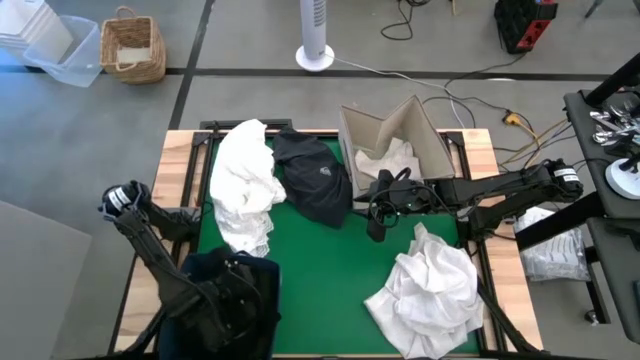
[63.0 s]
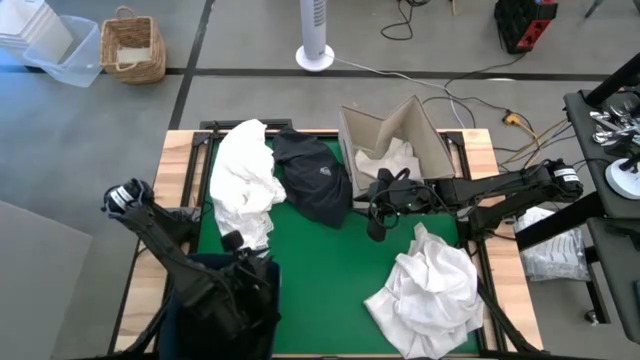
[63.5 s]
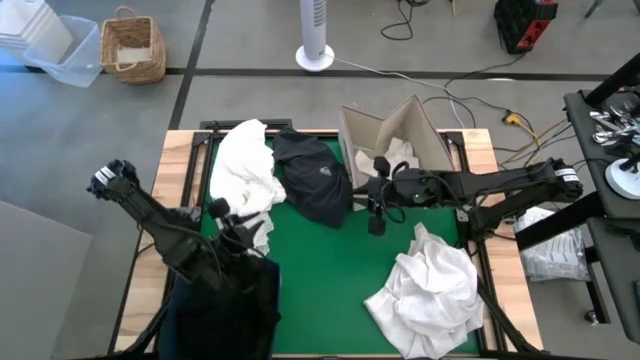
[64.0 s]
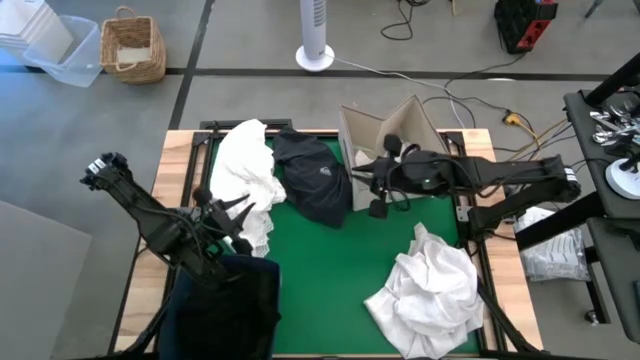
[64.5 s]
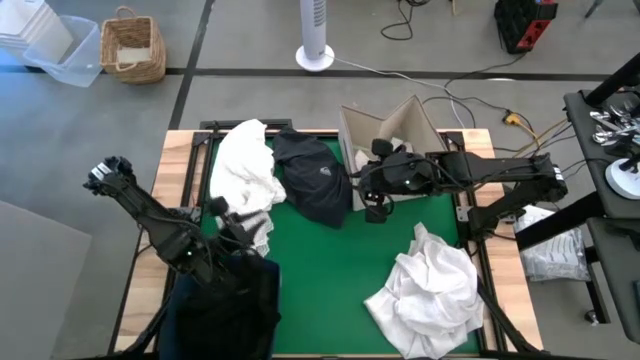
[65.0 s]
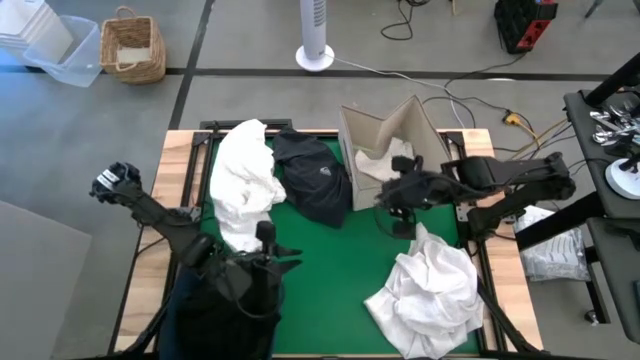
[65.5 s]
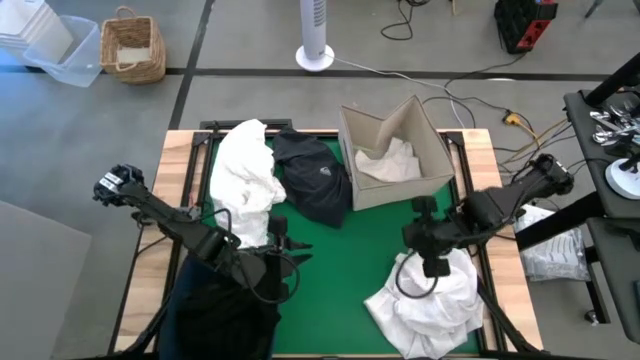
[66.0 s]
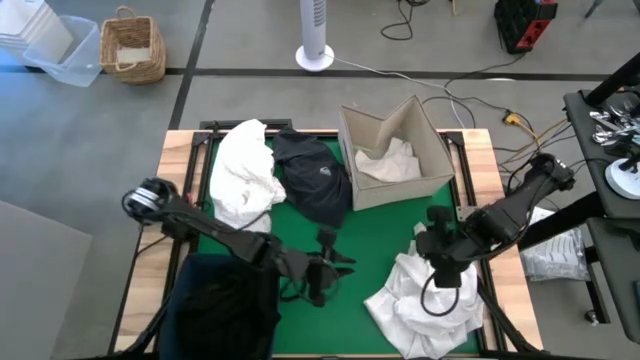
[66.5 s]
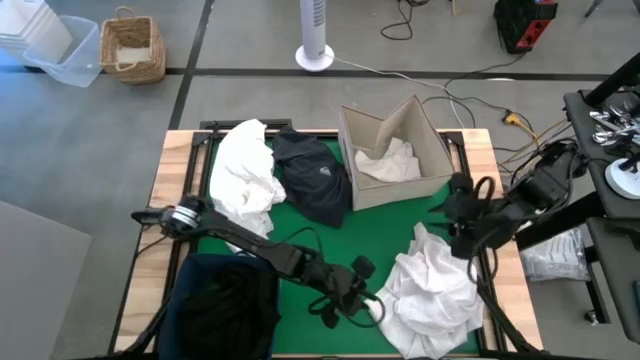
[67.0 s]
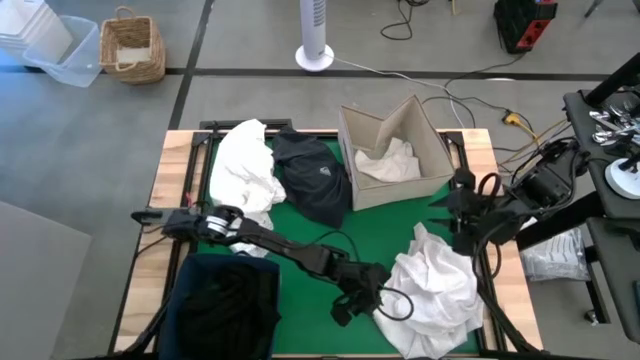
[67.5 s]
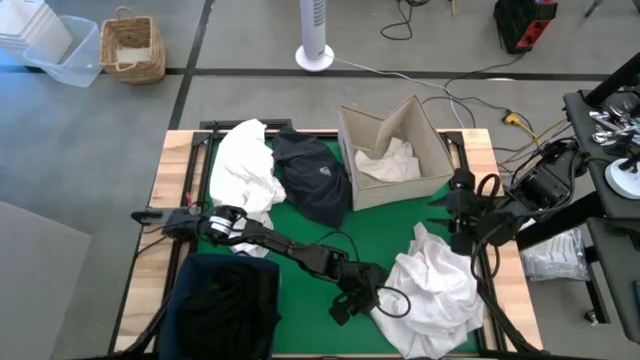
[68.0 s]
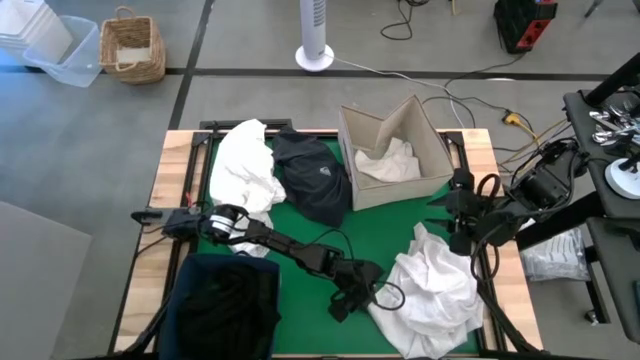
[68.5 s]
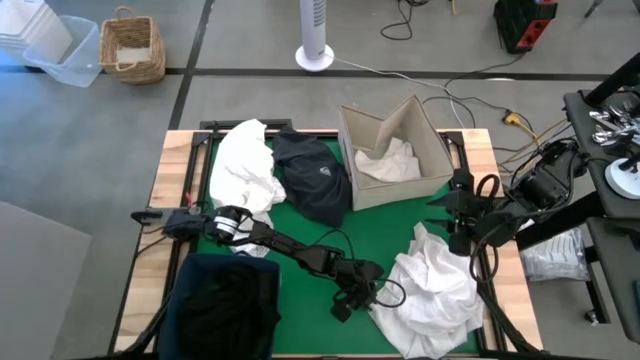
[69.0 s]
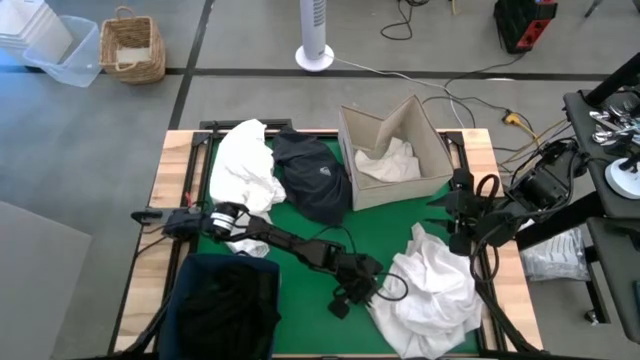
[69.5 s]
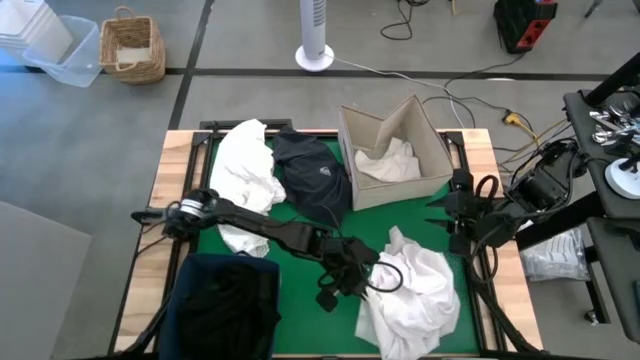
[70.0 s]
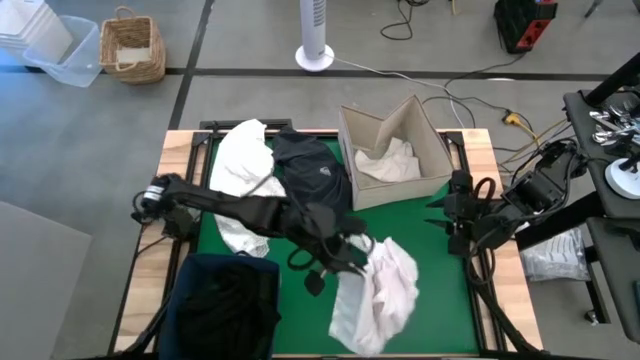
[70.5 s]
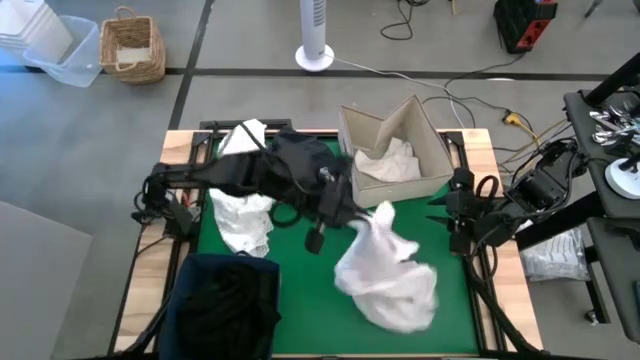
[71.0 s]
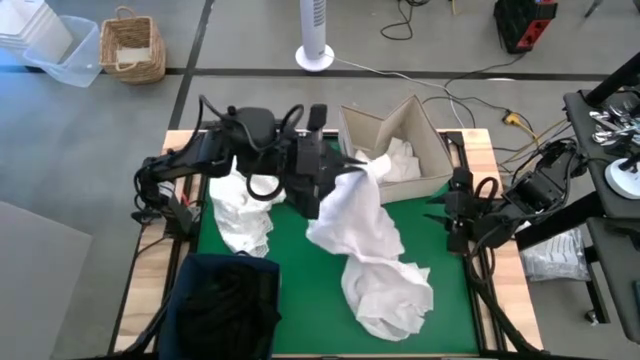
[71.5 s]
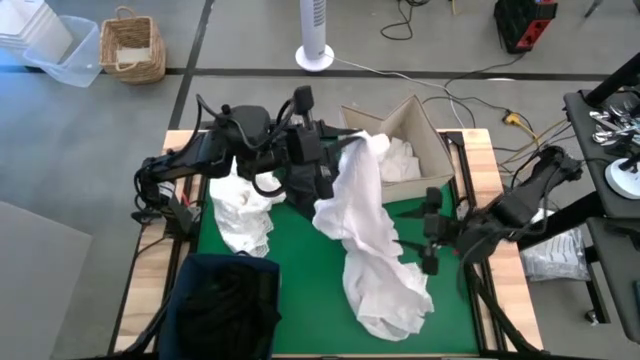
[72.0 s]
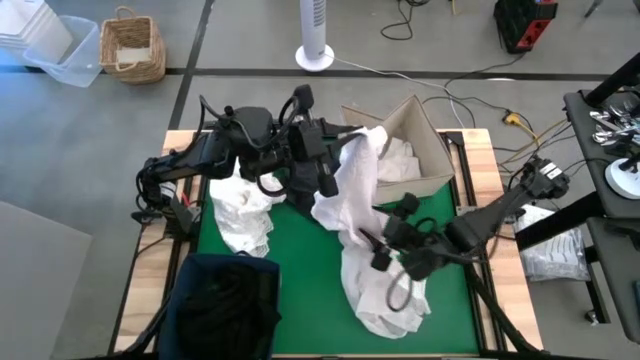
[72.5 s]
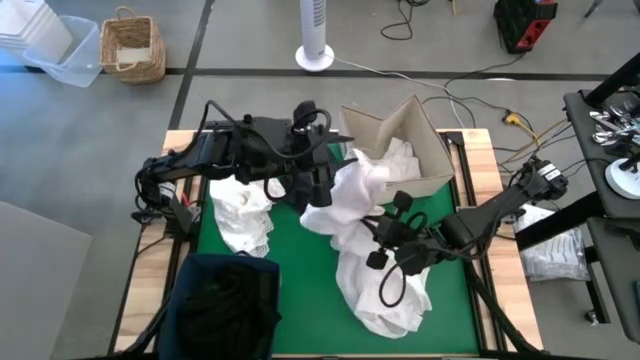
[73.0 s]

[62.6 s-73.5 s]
Put the bottom white shirt into the brown laundry organizer

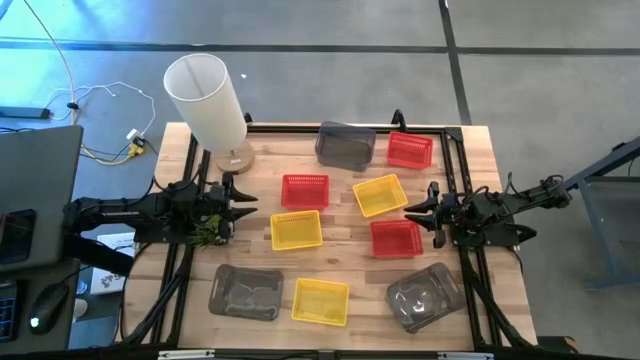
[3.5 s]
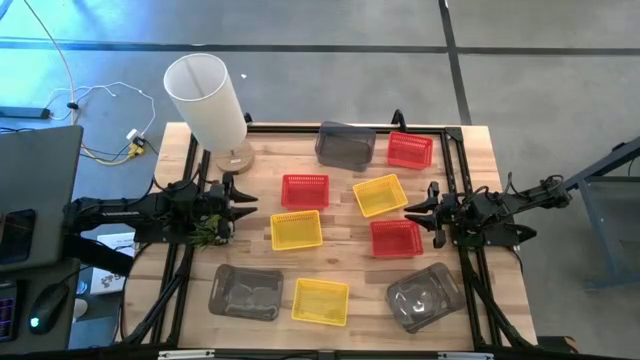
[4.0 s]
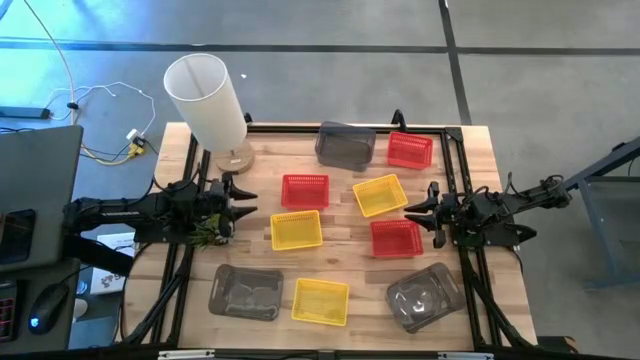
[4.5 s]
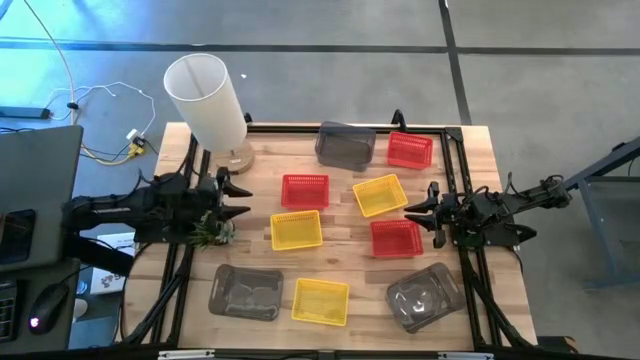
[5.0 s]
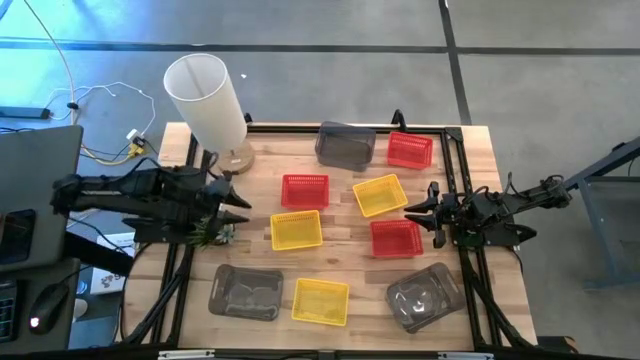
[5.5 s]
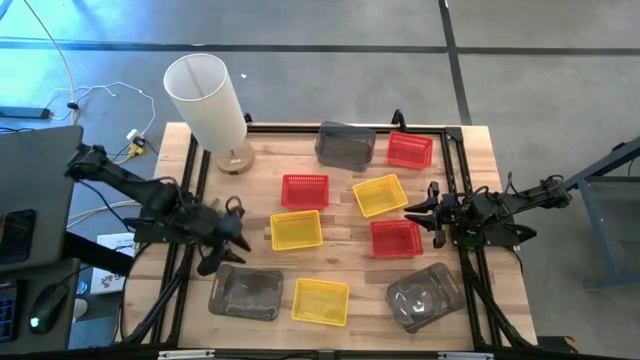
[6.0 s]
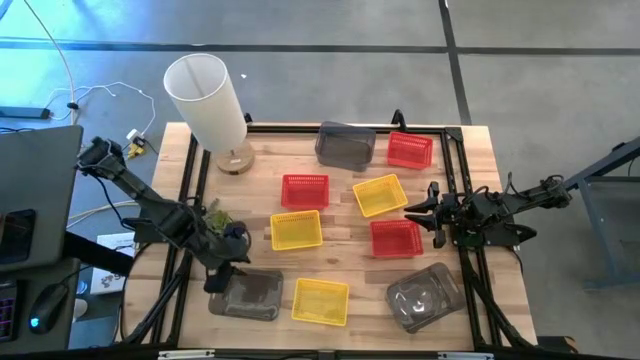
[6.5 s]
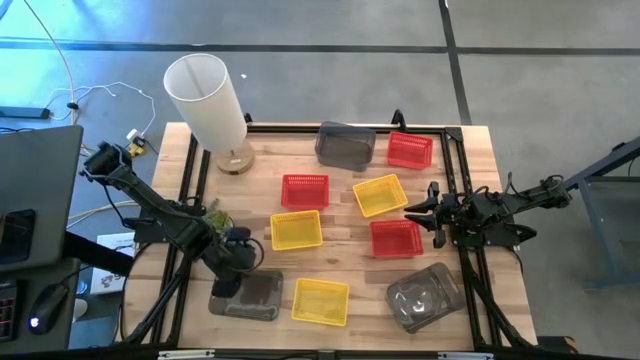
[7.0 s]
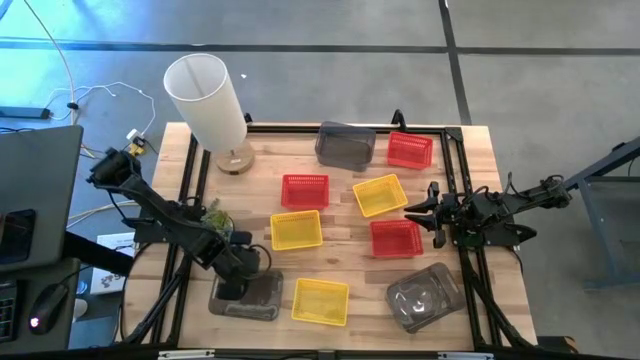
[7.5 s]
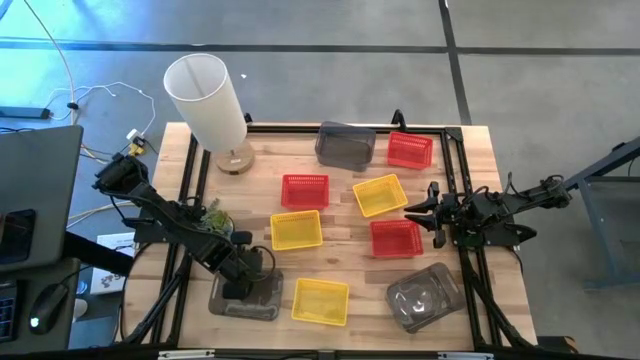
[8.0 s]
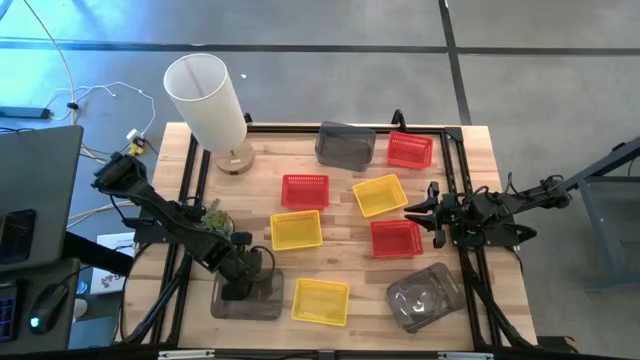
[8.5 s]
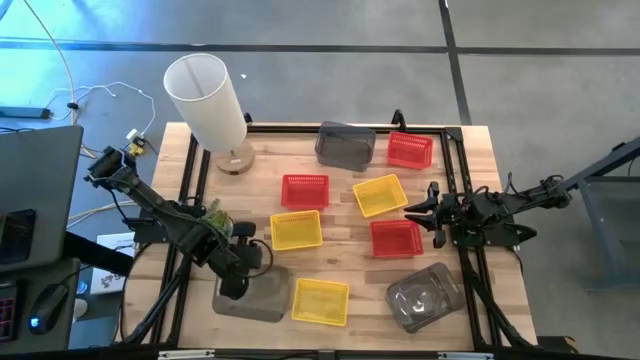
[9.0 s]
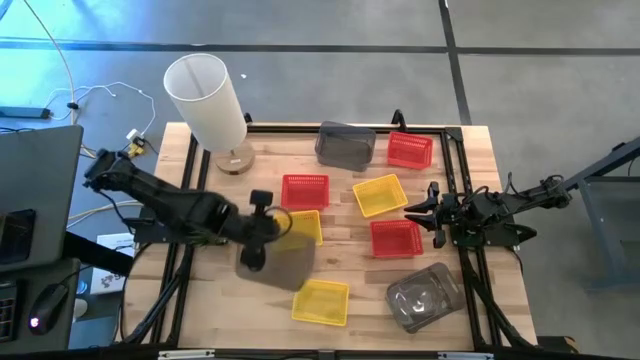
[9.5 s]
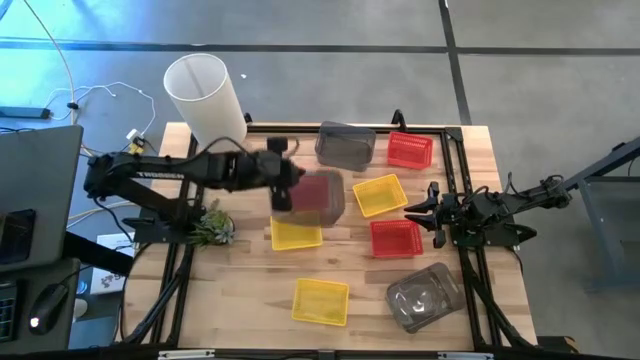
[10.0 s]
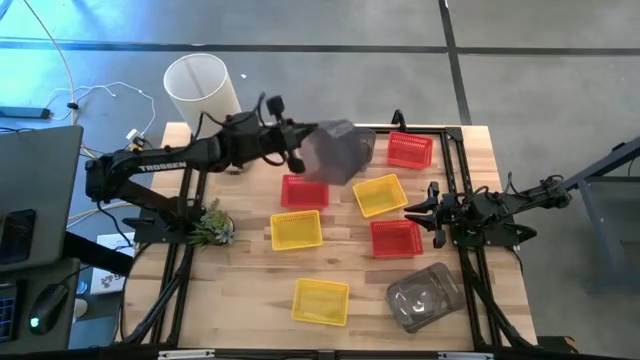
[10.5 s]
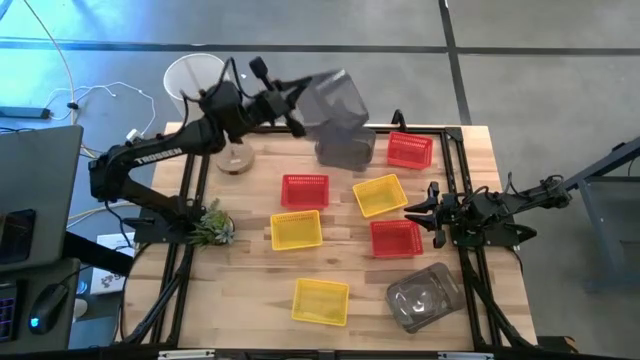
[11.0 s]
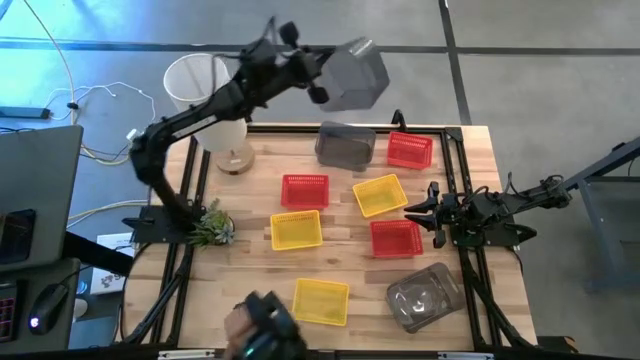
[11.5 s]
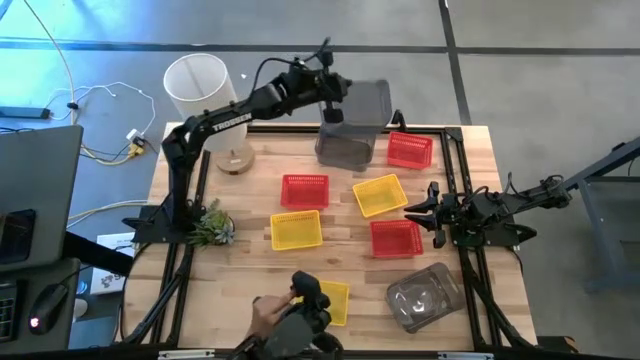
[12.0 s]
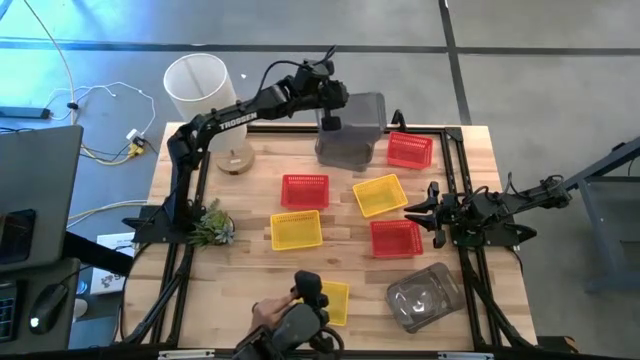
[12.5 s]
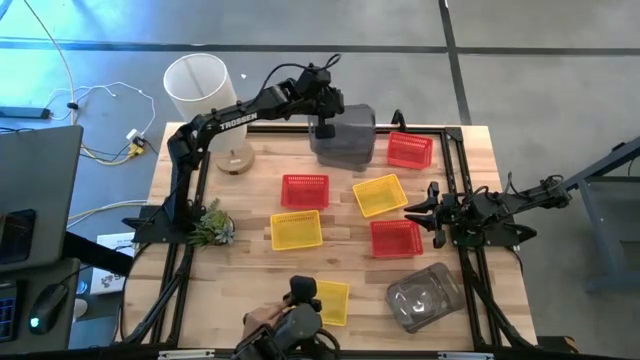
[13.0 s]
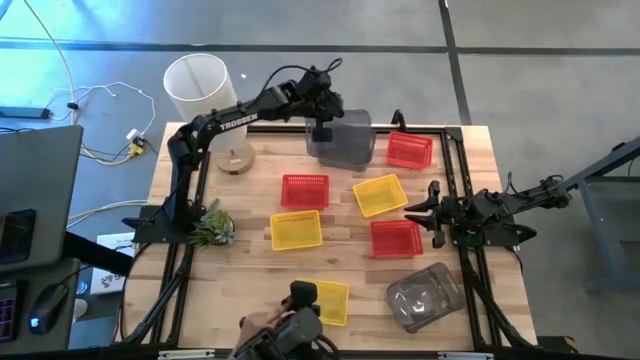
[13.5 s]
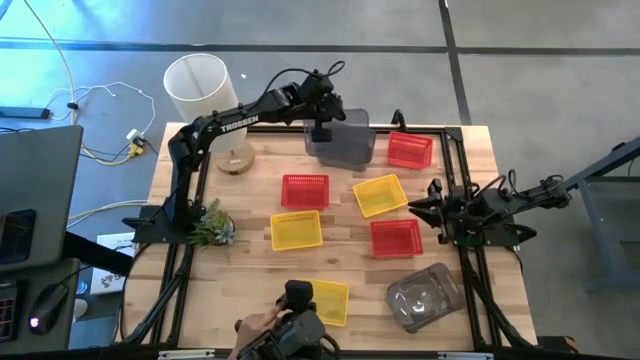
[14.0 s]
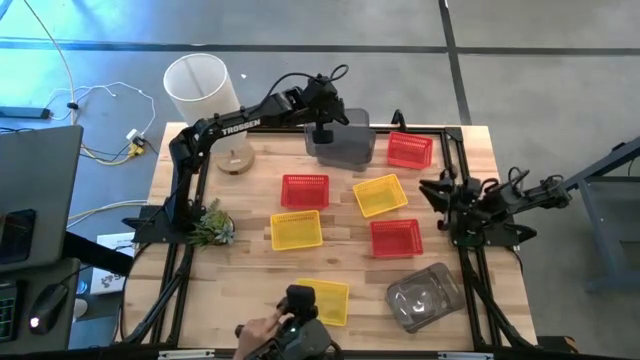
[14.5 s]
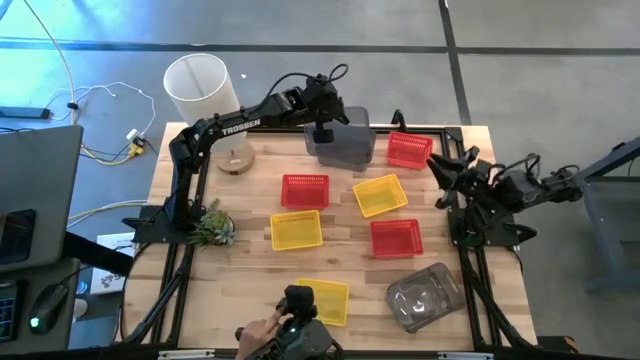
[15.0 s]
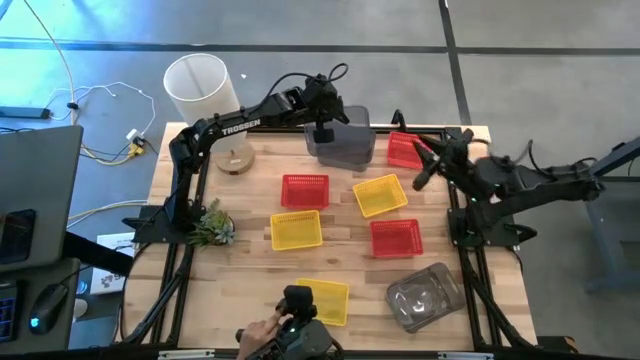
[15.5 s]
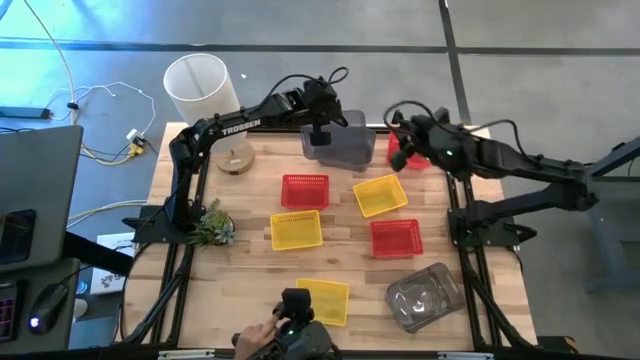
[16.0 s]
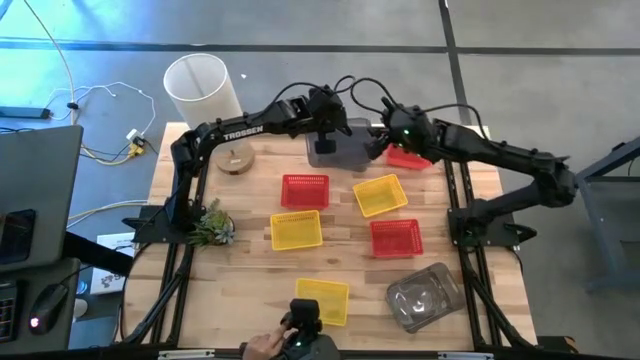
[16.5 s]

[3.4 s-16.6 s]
Stack the bottom left black bin on the top black bin
